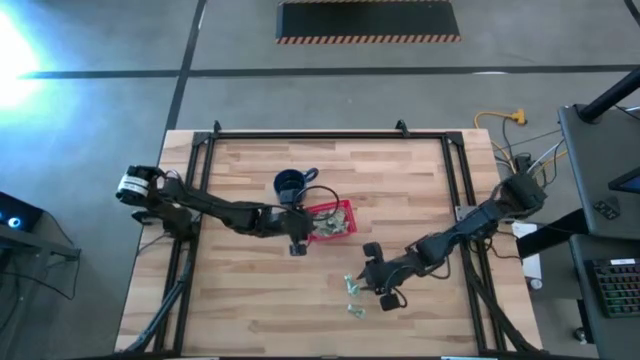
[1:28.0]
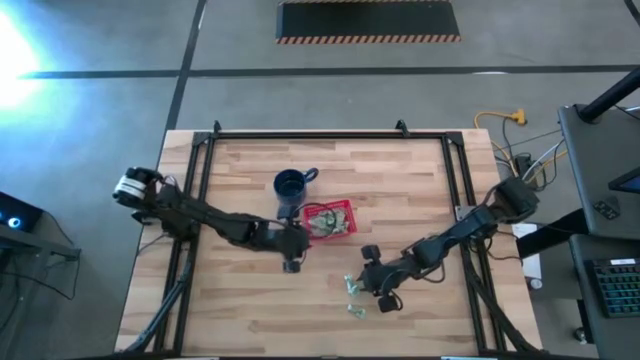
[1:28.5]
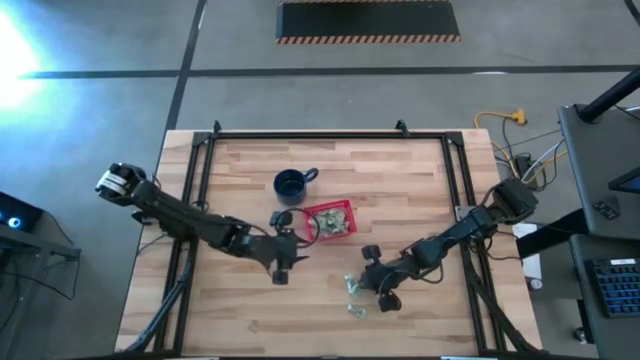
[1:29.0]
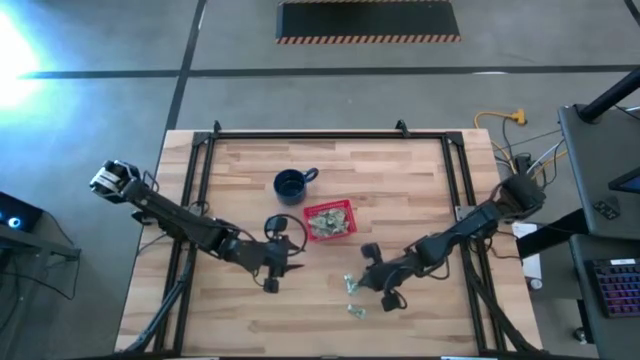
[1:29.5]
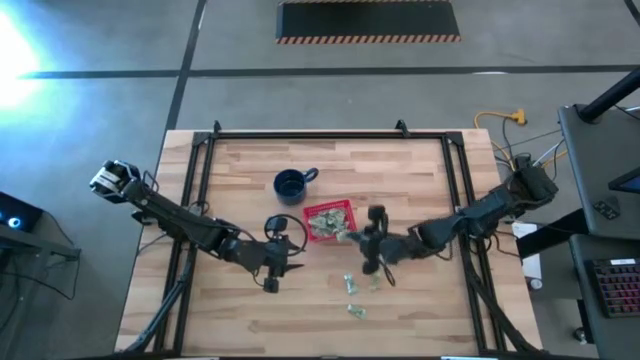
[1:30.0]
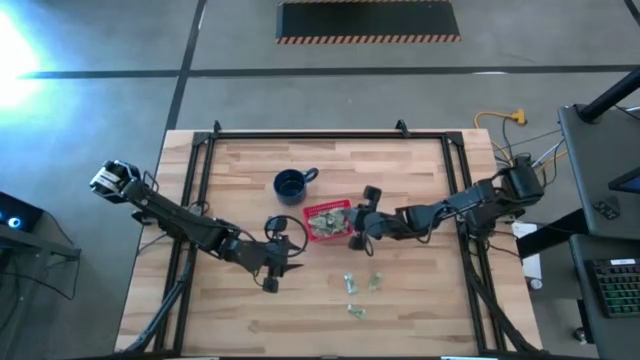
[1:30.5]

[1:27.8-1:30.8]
Task: Pick and place Stevia / Truvia into bins
Put the white stevia packet into the red basket

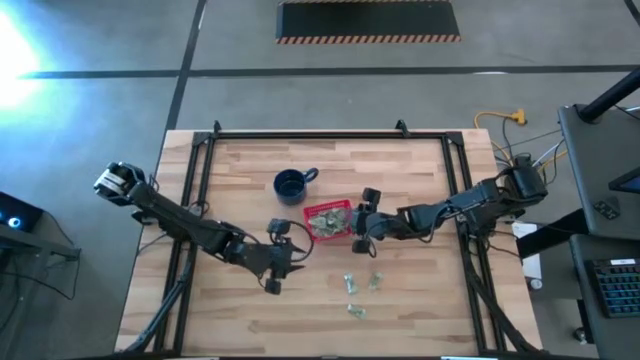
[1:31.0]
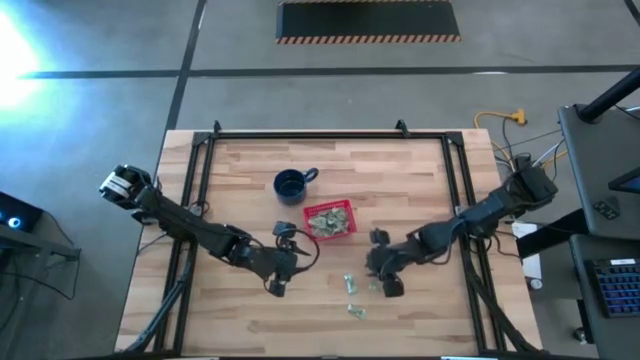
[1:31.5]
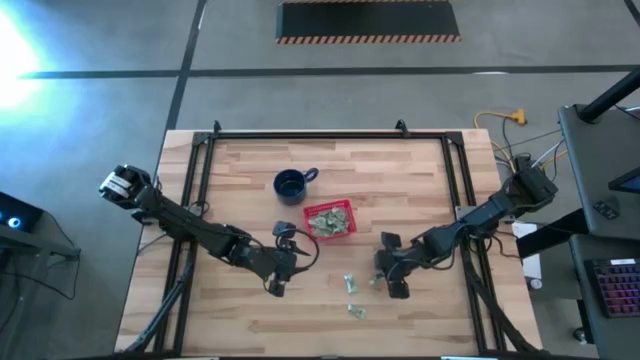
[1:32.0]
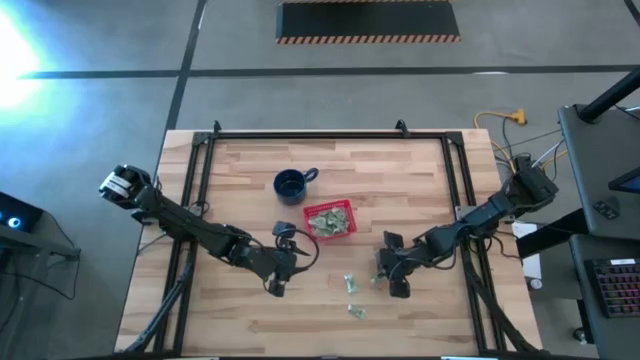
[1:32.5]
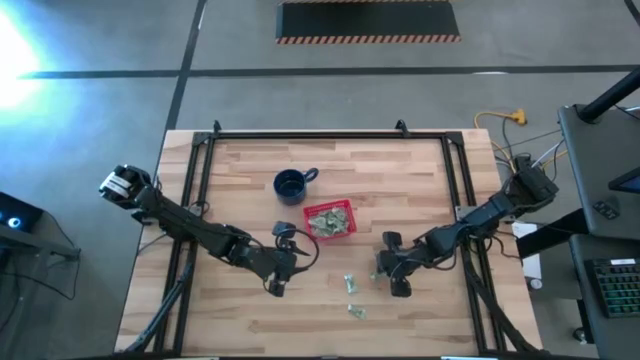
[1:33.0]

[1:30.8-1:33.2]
Put the white stevia packet into the red basket

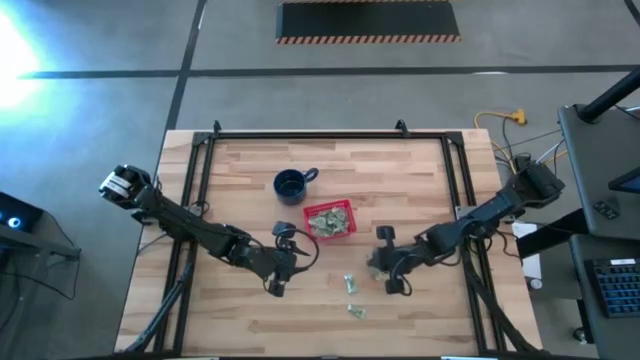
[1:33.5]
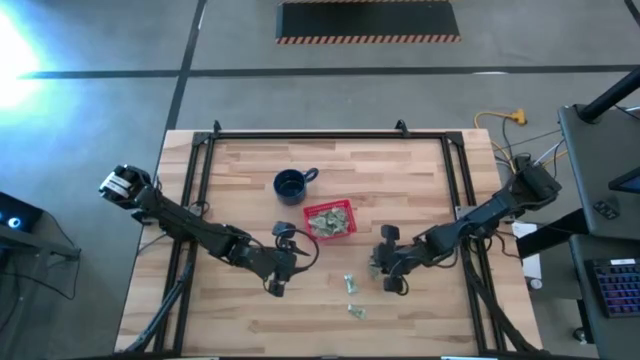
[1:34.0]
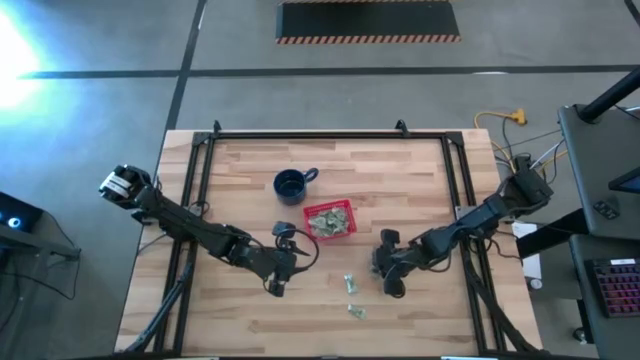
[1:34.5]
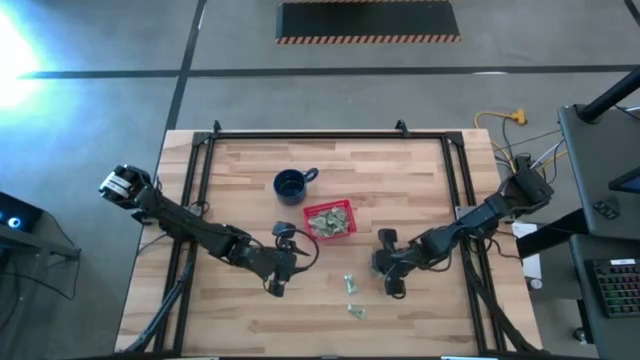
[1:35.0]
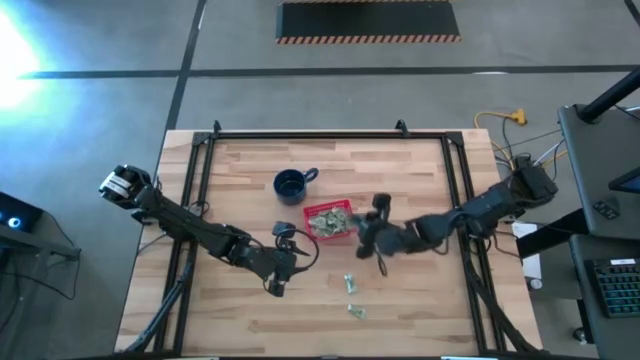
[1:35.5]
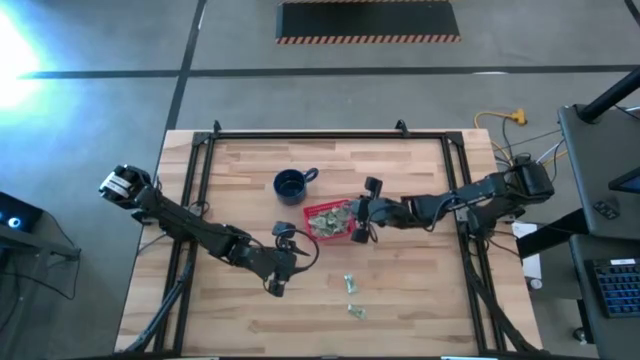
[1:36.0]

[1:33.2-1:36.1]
Put the white stevia packet into the red basket

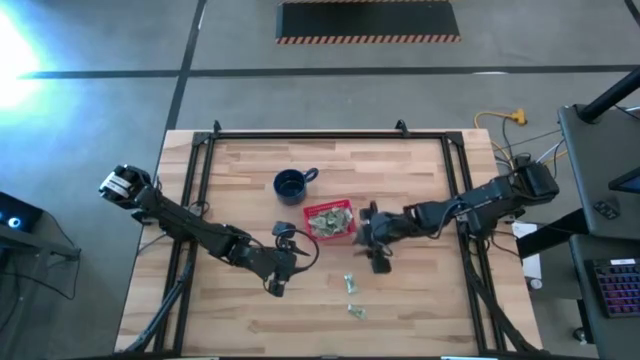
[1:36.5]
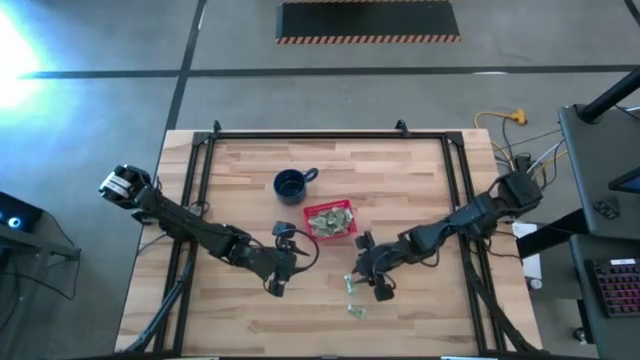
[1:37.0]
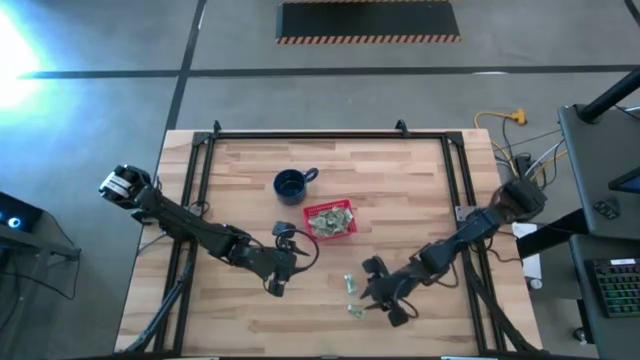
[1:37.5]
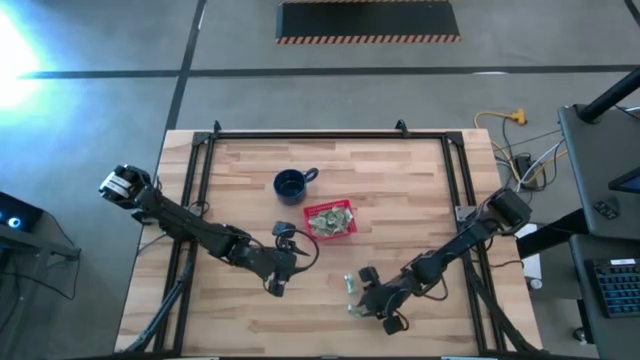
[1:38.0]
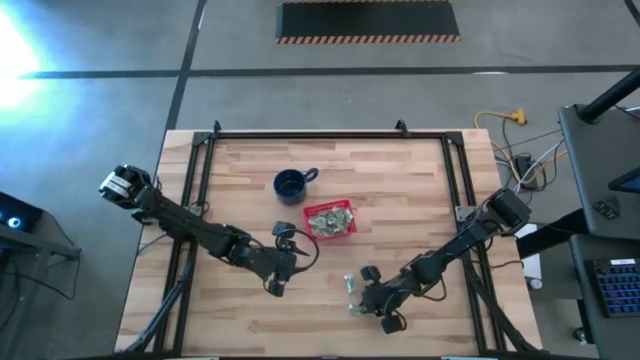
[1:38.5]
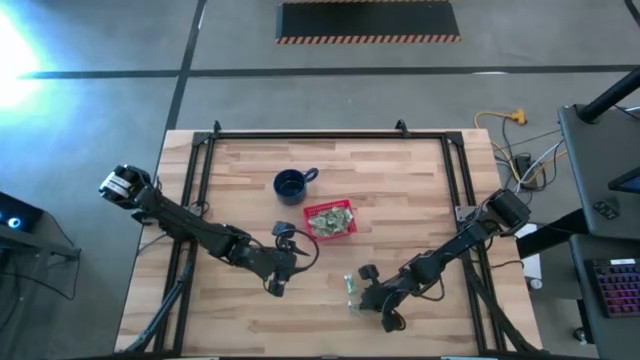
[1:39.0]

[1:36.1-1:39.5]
Put the white stevia packet into the red basket

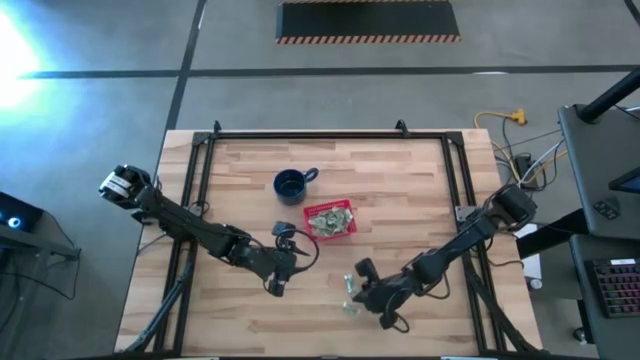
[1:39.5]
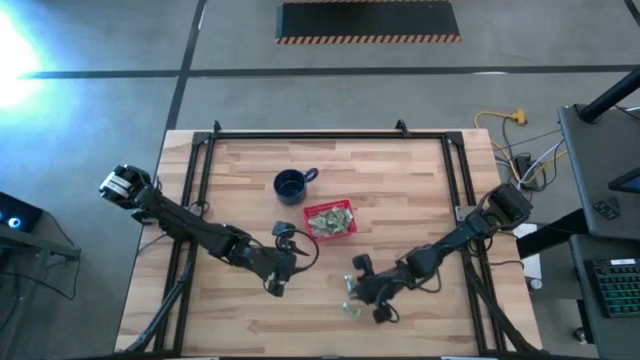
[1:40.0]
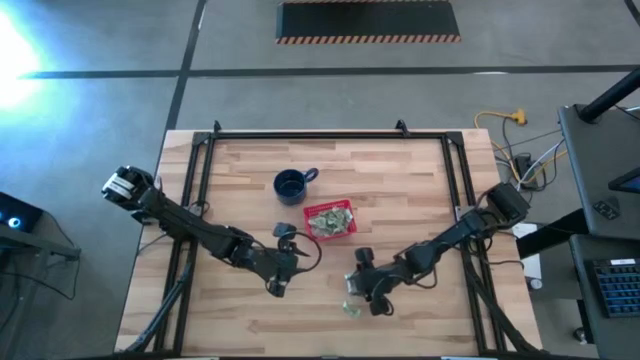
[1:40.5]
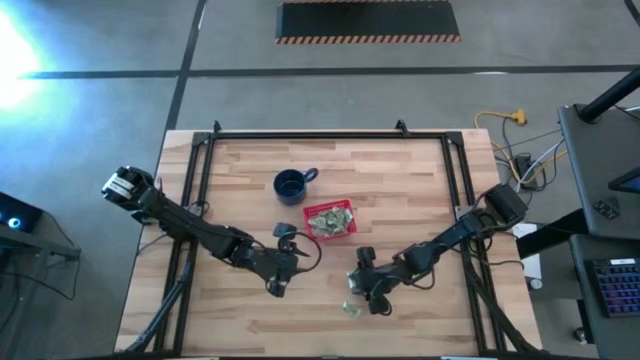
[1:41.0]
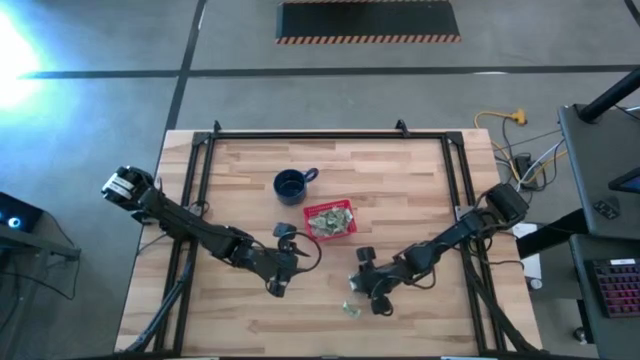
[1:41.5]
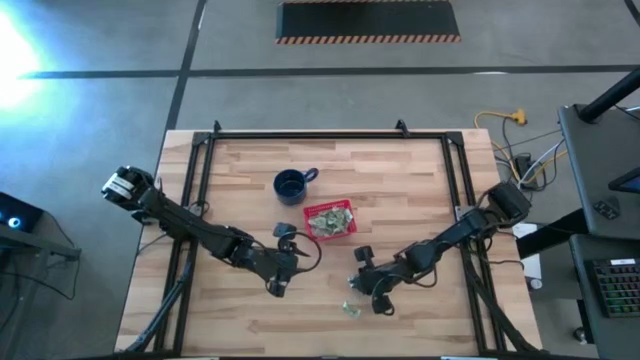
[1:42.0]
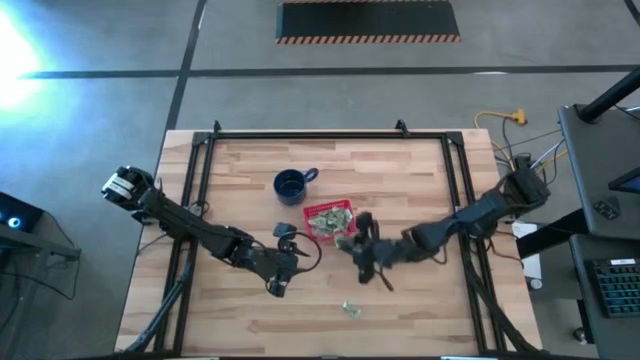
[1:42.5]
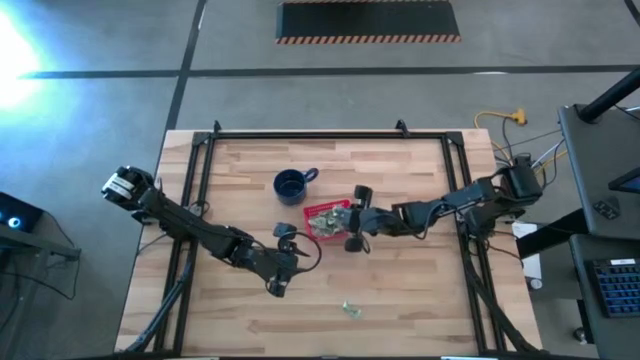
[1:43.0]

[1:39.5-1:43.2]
Put the white stevia packet into the red basket

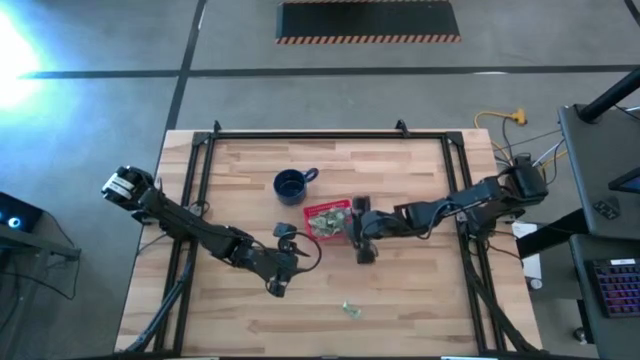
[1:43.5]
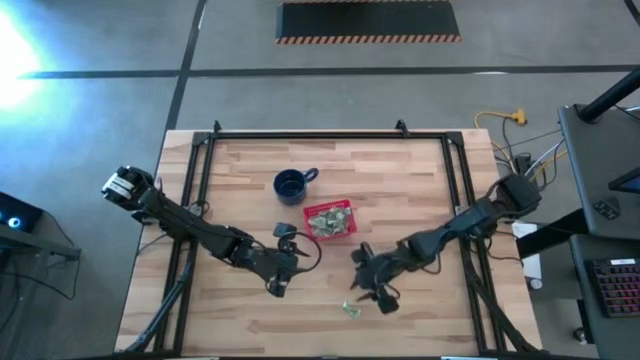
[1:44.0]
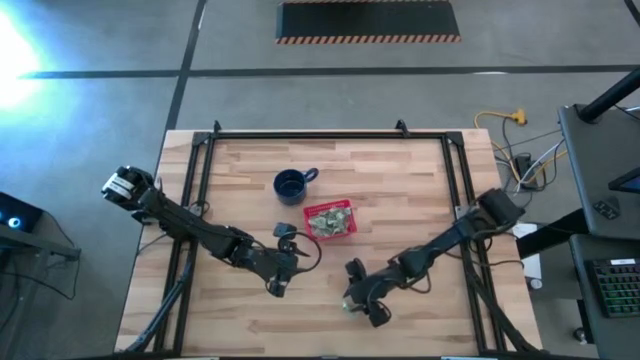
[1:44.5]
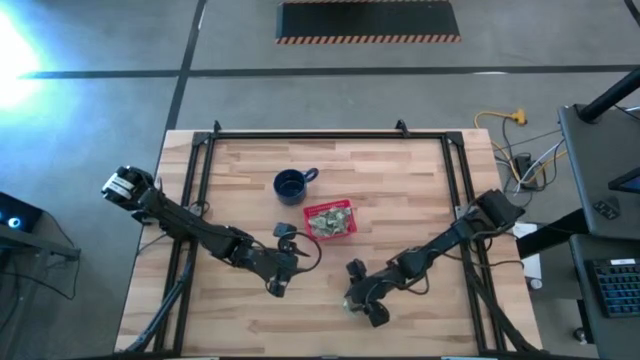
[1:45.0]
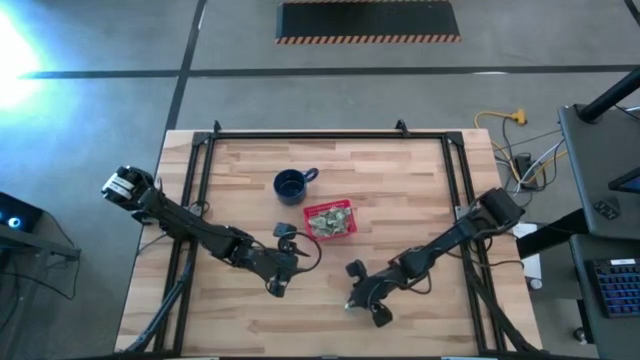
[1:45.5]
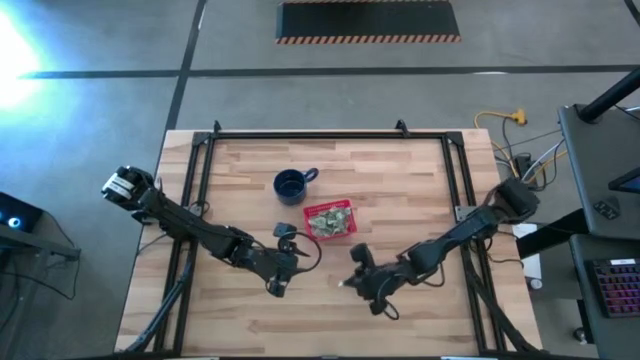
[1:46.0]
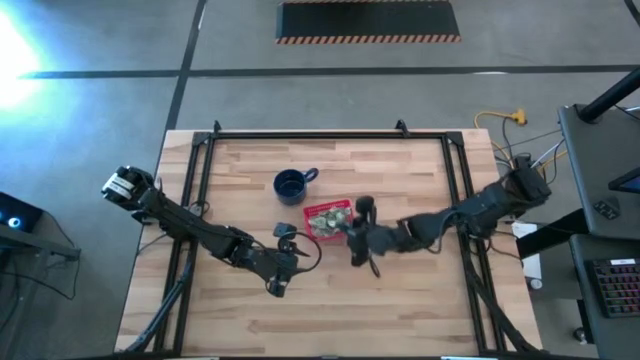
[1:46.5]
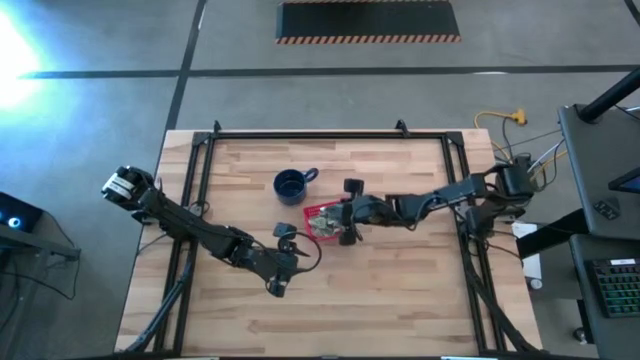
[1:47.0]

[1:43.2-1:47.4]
Put the white stevia packet into the red basket

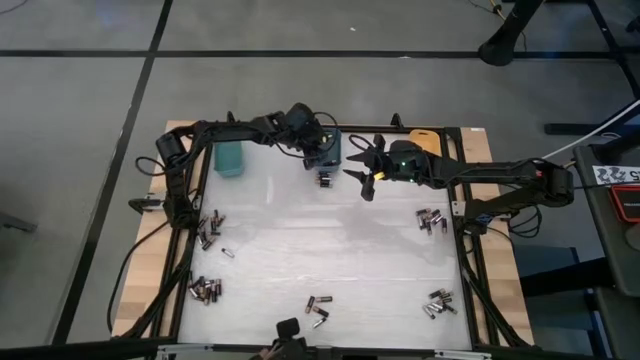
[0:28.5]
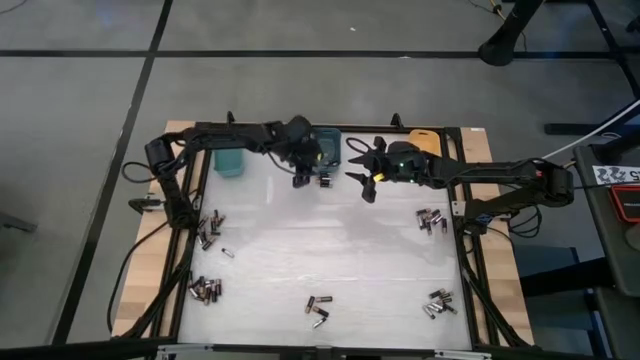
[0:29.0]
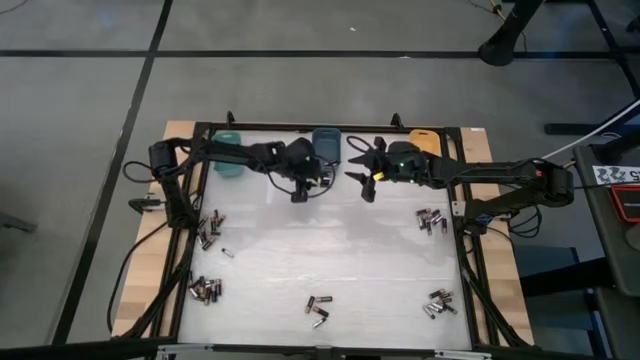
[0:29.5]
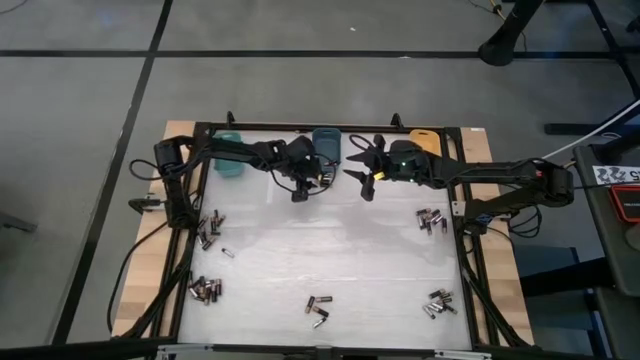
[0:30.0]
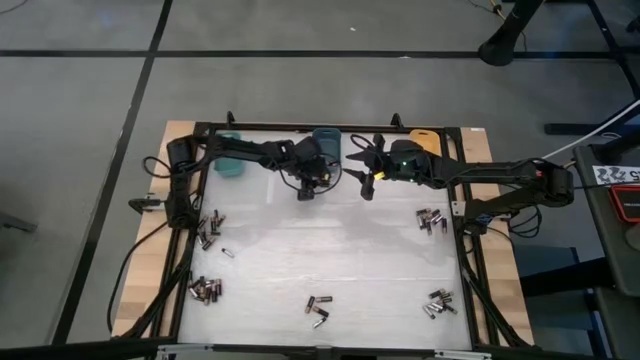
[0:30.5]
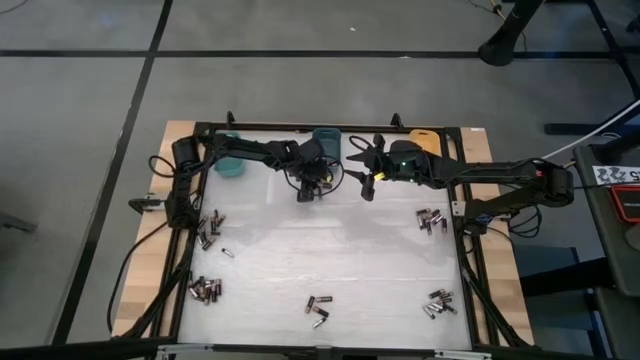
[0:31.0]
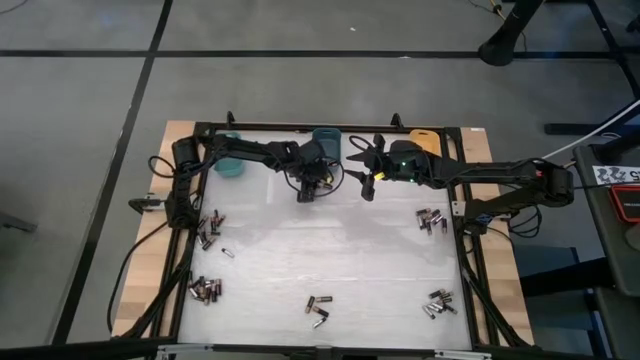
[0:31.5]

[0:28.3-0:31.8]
Task: Sort batteries
Put the brown battery into the blue bin
